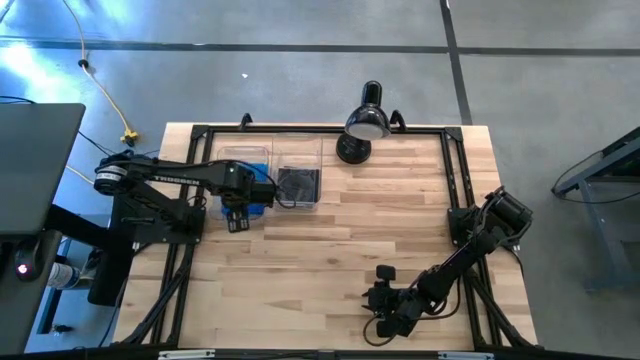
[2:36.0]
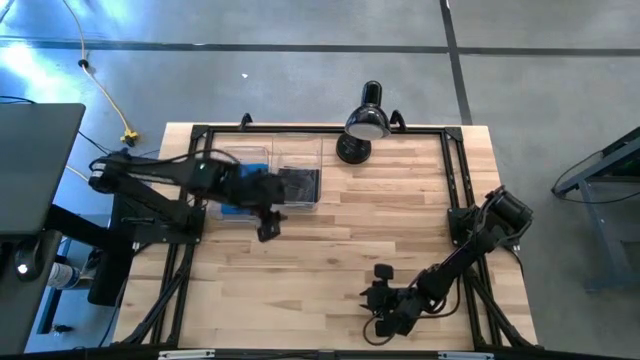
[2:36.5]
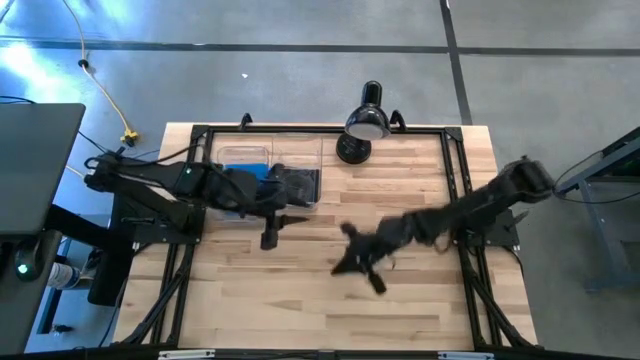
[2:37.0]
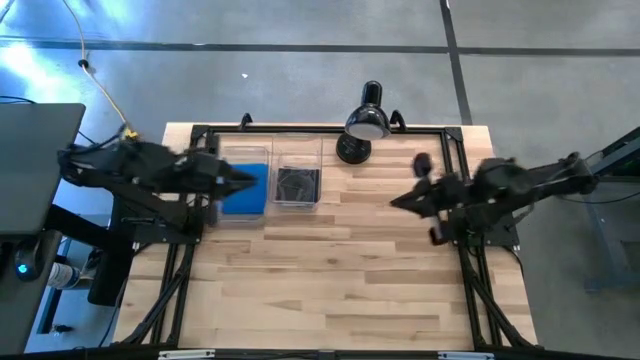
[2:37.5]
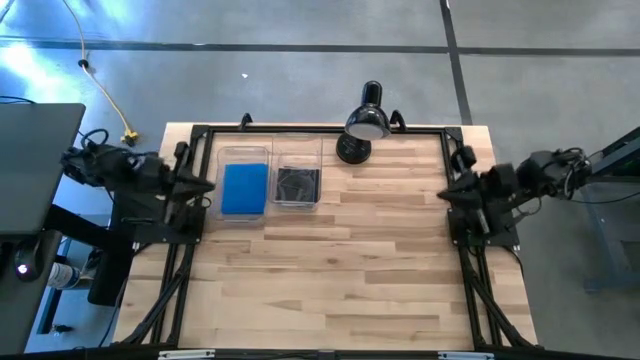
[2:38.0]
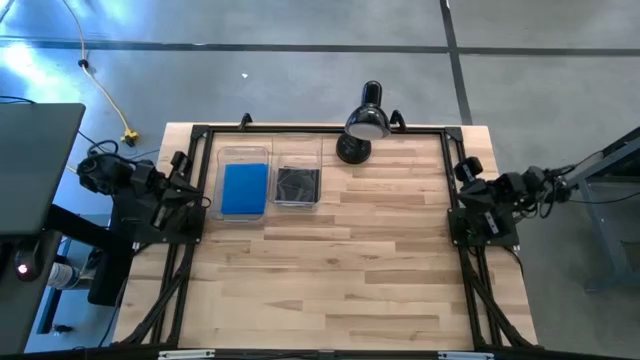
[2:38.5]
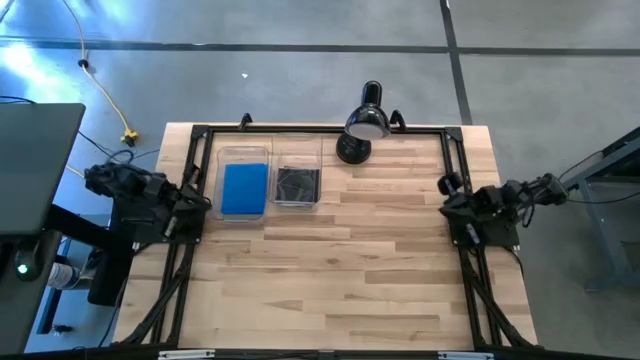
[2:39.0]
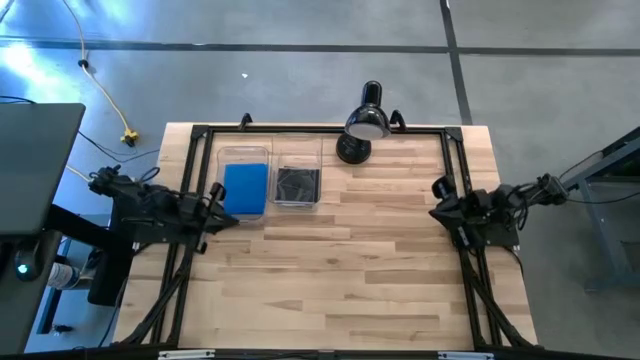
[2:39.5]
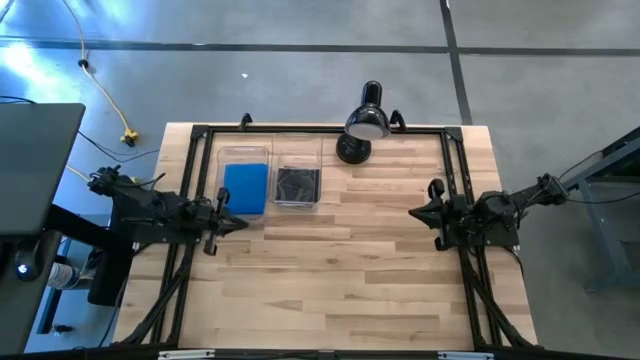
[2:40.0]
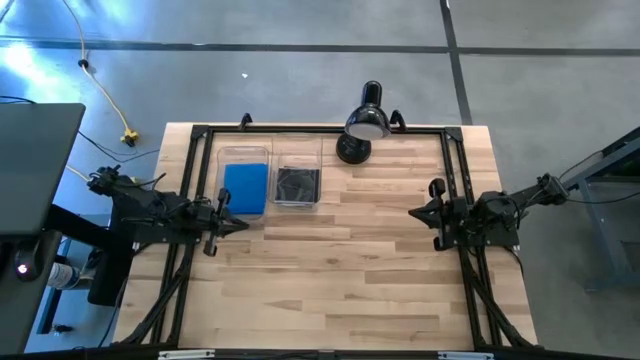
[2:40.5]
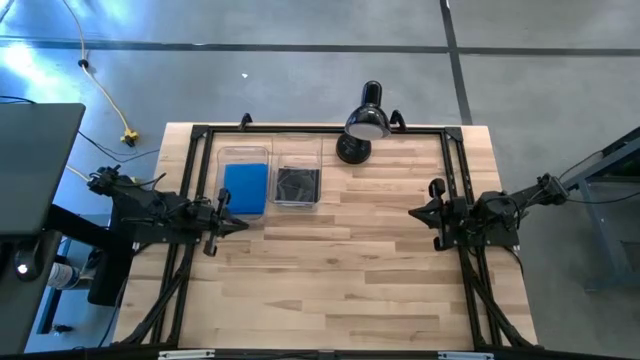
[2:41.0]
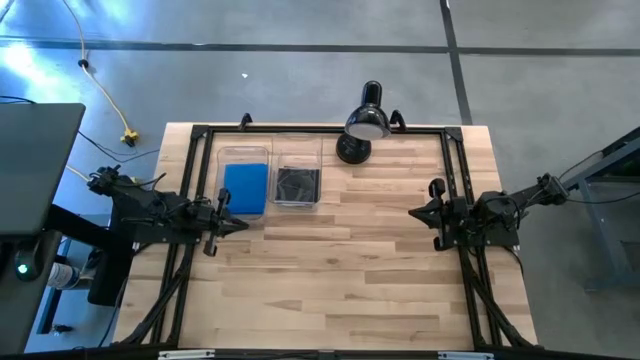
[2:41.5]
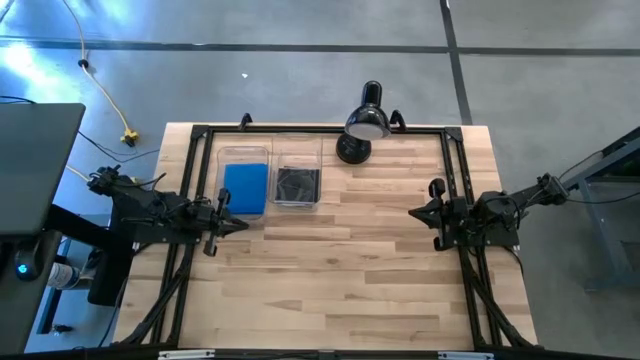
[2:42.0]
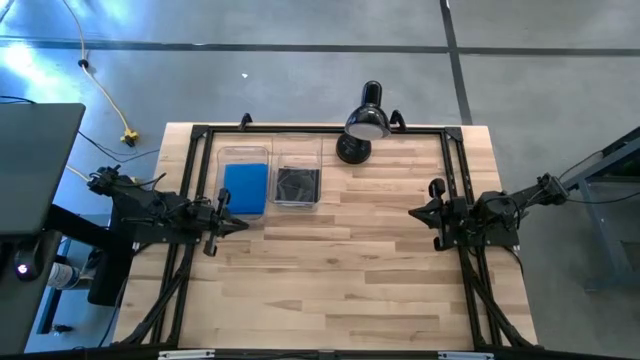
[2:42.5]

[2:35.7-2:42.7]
Task: Pick & place jewel cases by type
Return to Home position

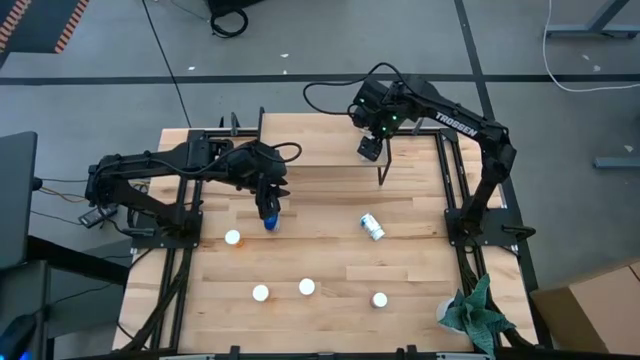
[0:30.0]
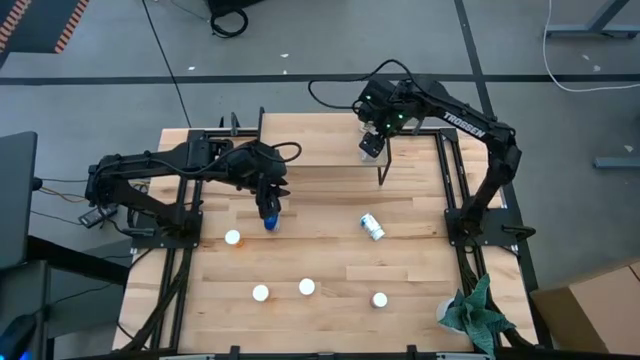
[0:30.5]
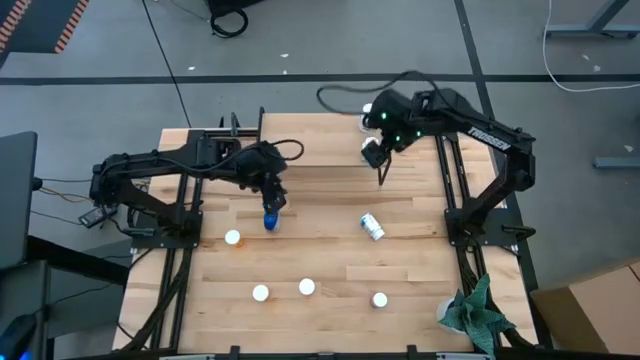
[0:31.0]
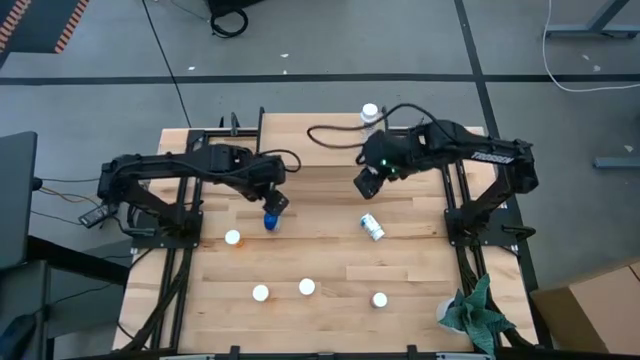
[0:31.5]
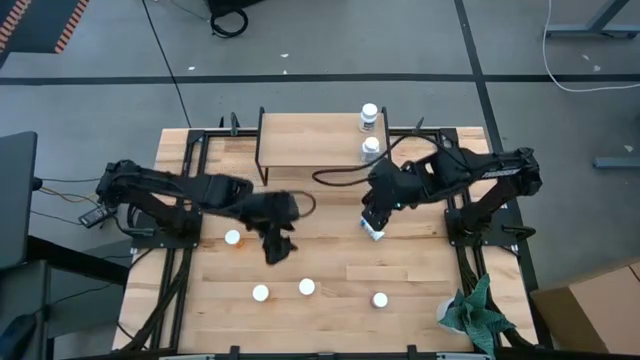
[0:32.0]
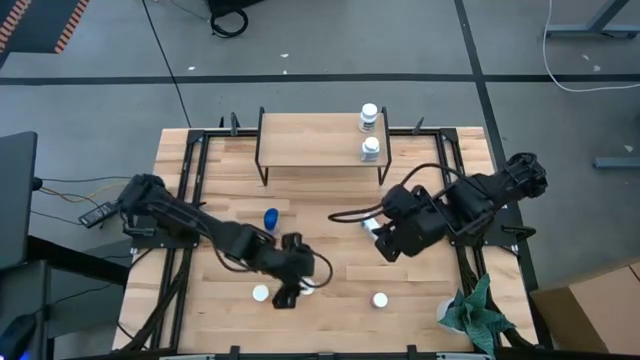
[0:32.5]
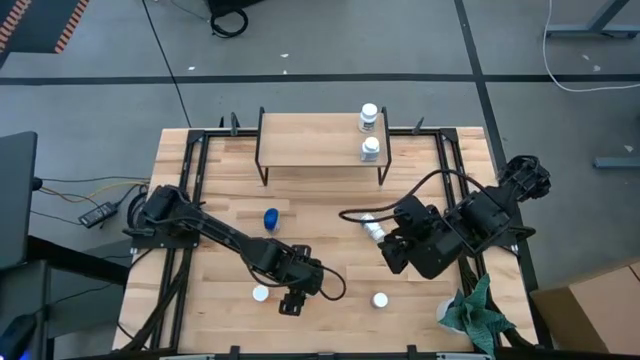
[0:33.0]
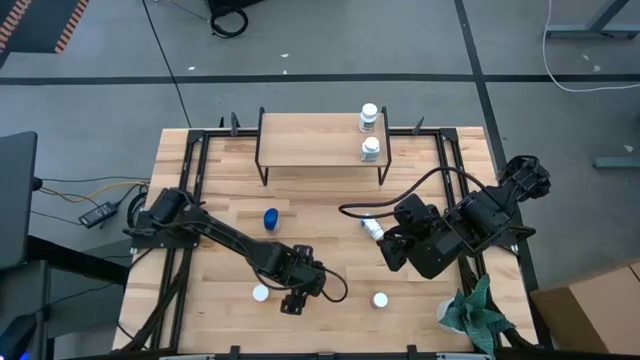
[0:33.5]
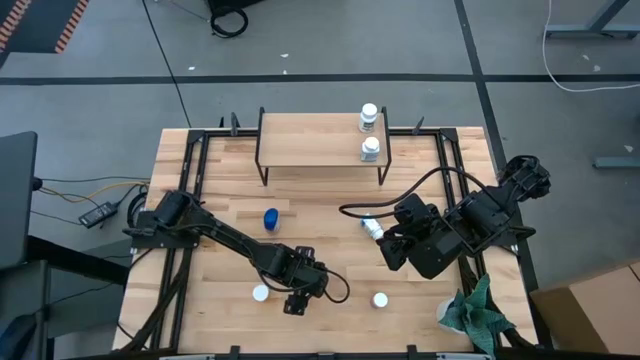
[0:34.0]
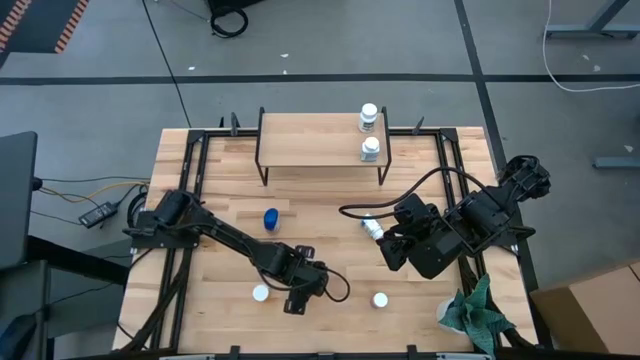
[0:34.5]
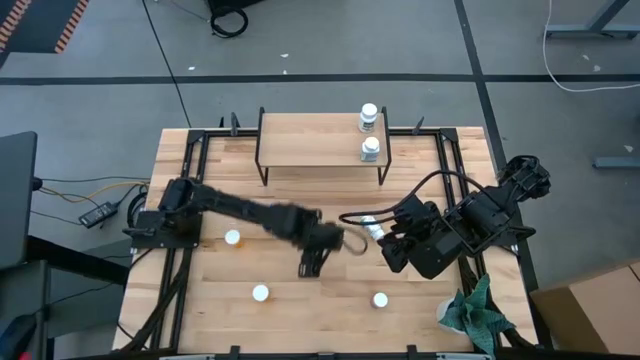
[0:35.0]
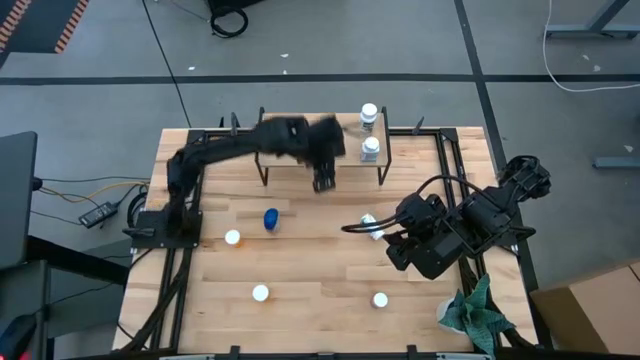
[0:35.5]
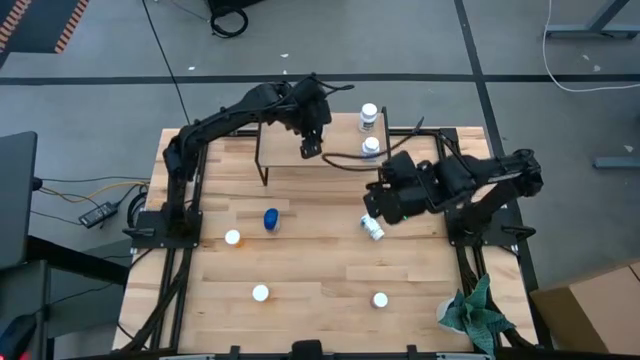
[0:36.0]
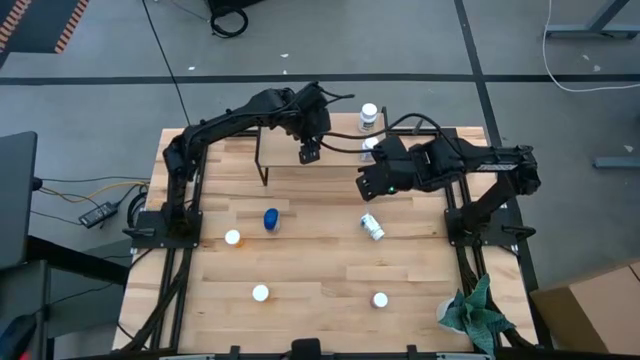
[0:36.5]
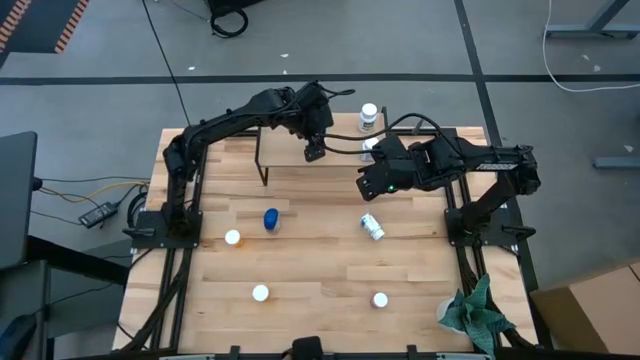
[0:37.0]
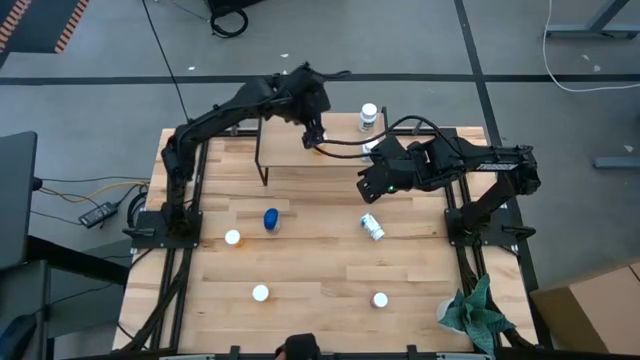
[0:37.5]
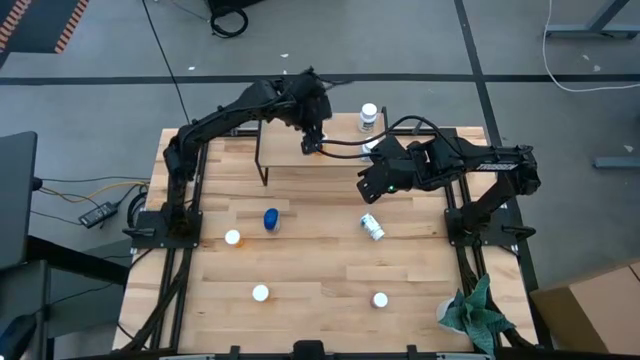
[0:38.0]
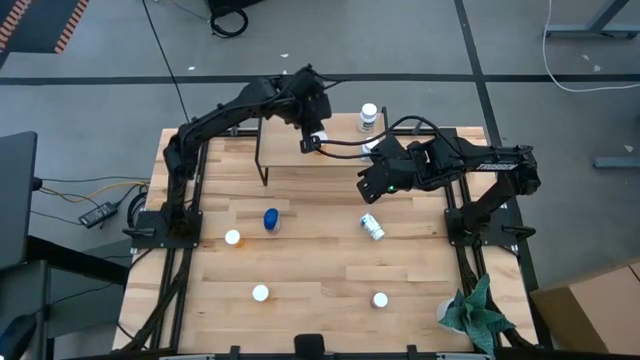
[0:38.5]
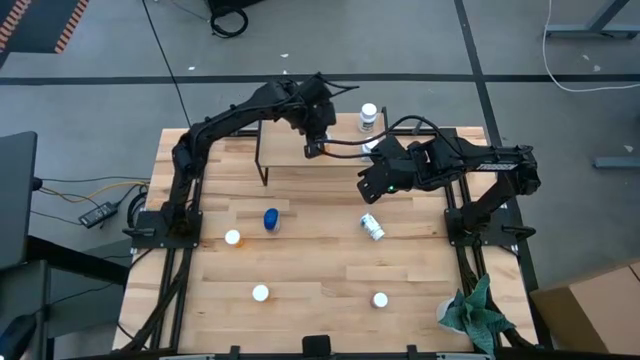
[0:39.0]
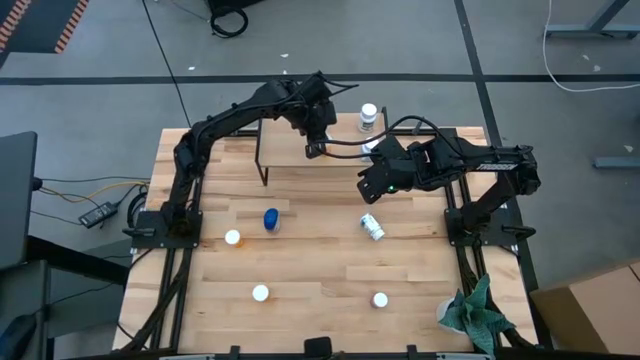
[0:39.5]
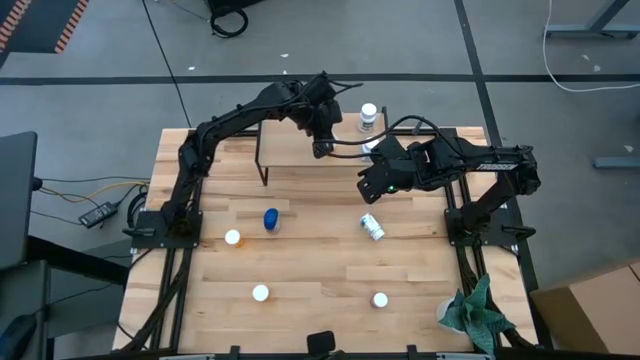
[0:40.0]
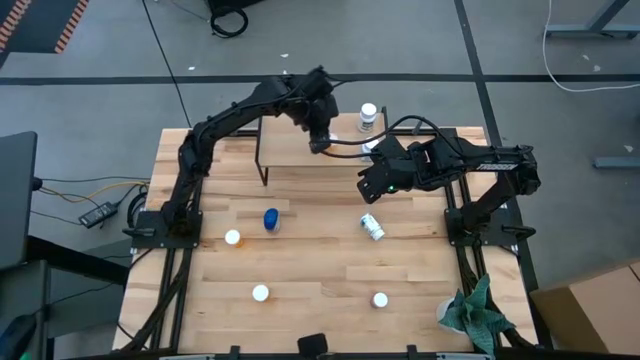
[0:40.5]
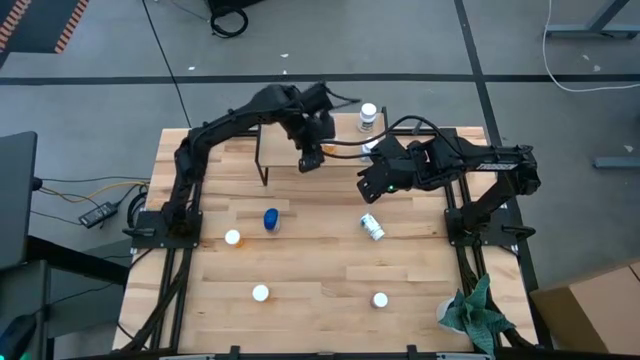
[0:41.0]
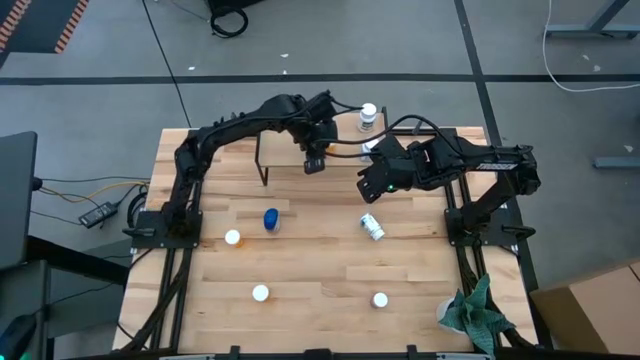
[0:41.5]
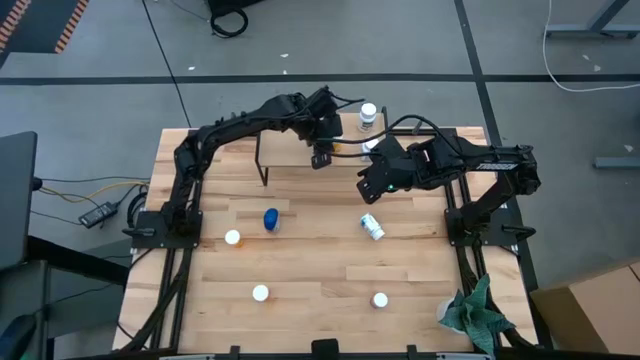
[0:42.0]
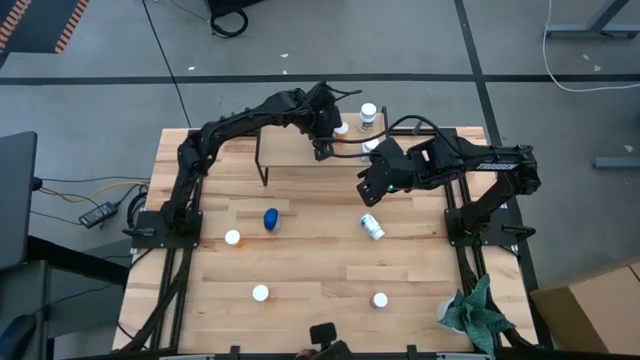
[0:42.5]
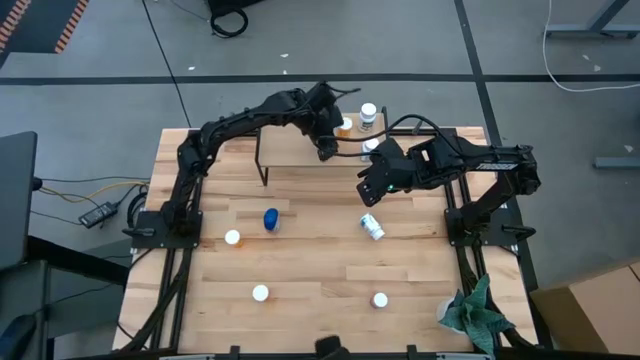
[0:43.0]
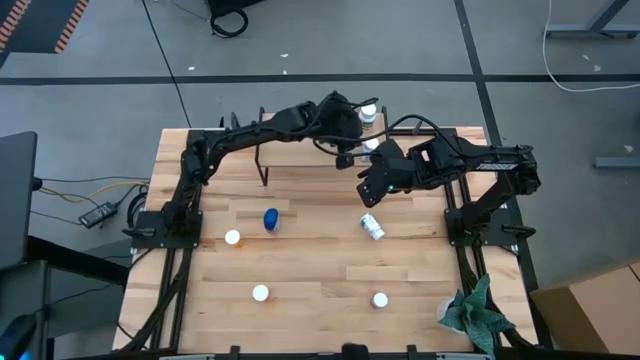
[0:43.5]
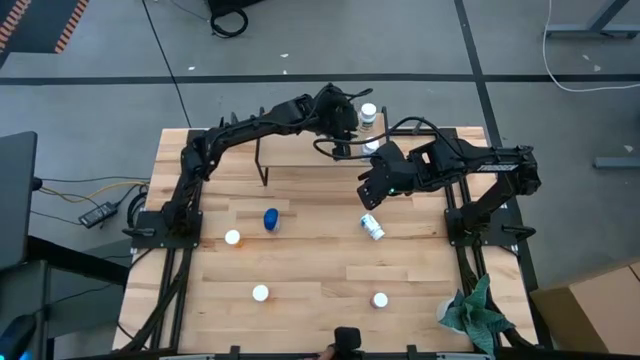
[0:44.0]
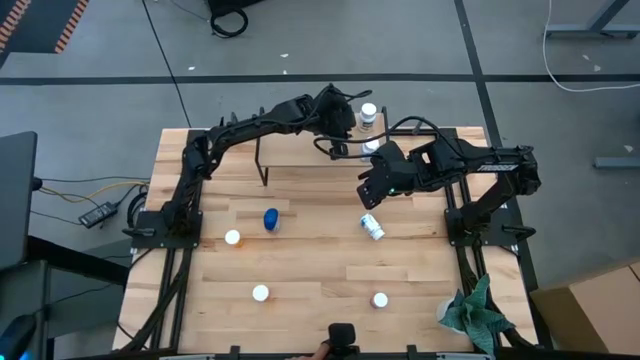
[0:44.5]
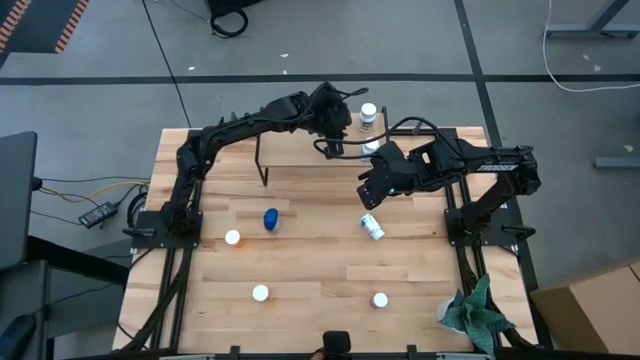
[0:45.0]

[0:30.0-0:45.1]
Task: Pick and place medicine bottles onto shelf by color
Put the bottom right orange medicine bottle on the shelf
